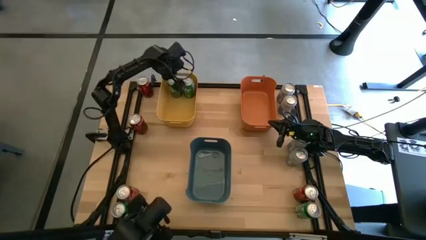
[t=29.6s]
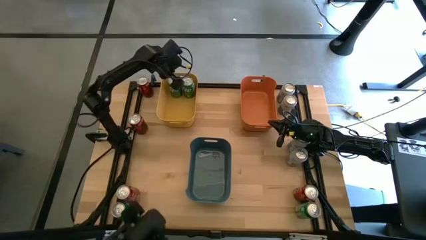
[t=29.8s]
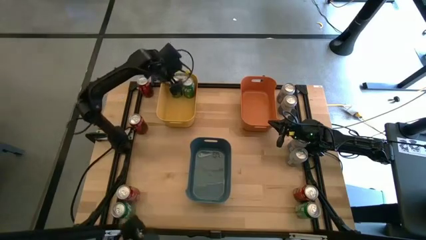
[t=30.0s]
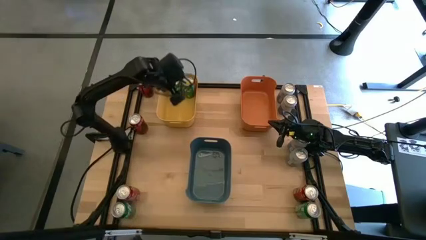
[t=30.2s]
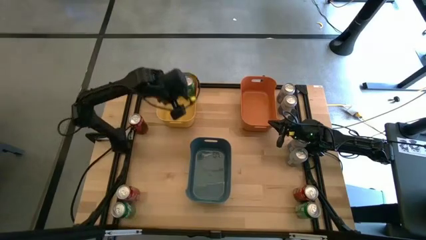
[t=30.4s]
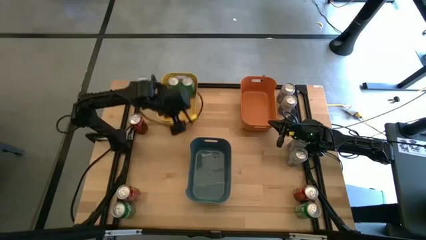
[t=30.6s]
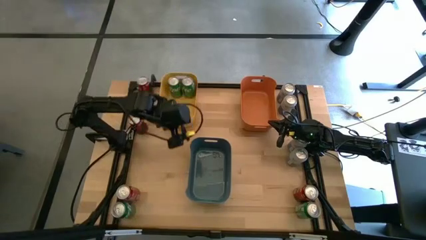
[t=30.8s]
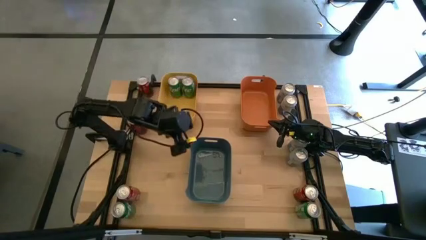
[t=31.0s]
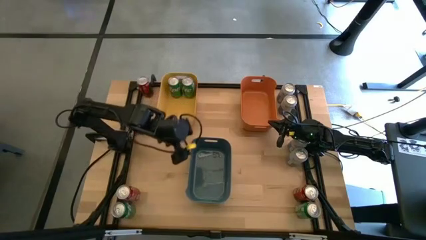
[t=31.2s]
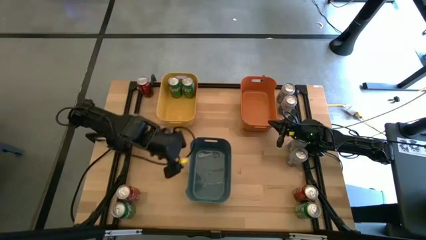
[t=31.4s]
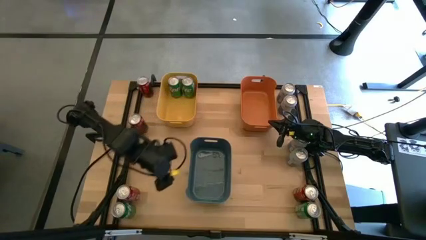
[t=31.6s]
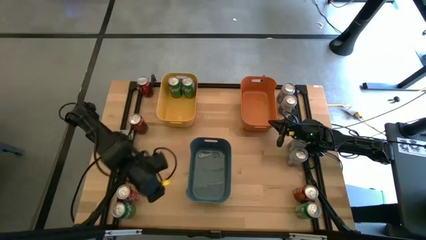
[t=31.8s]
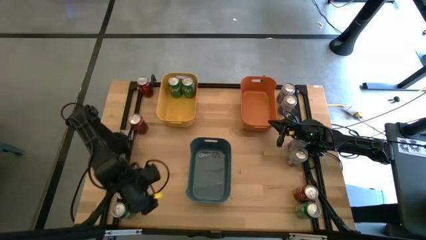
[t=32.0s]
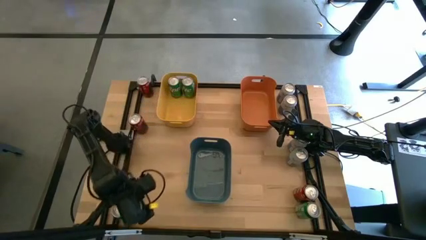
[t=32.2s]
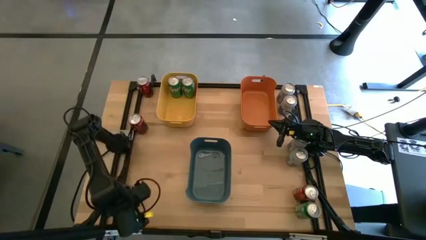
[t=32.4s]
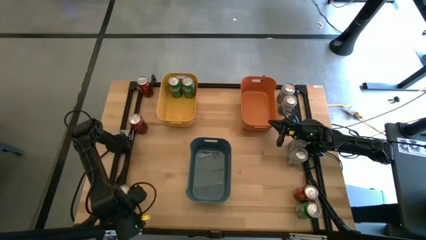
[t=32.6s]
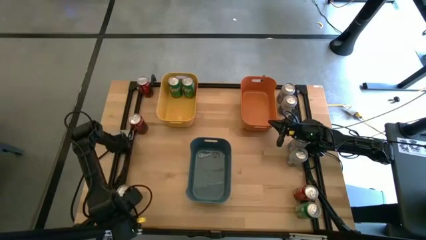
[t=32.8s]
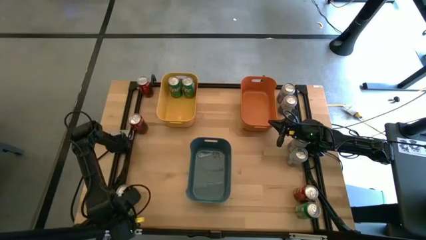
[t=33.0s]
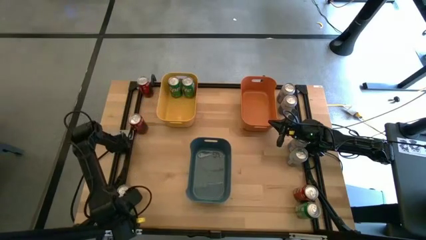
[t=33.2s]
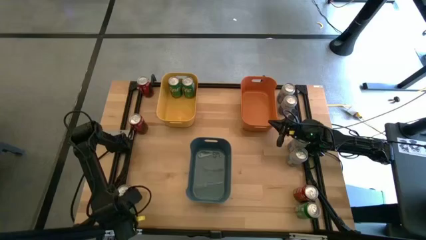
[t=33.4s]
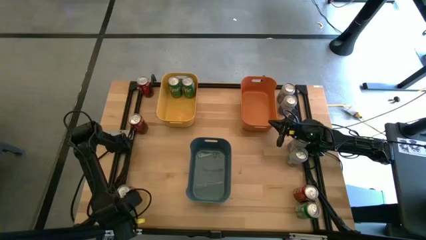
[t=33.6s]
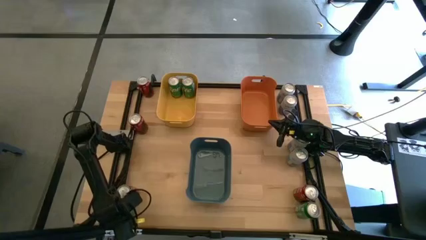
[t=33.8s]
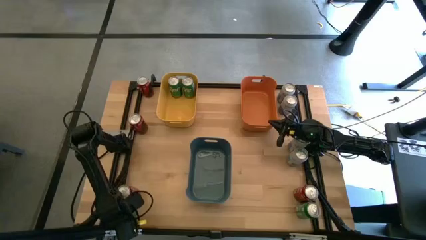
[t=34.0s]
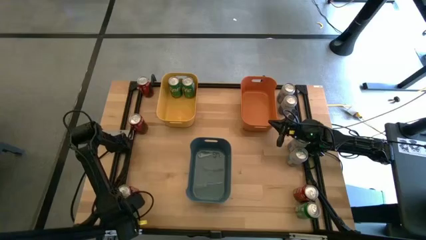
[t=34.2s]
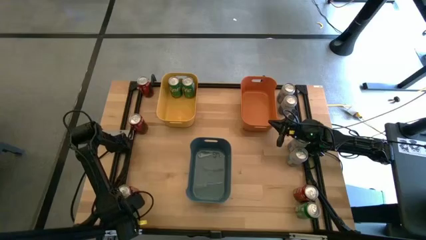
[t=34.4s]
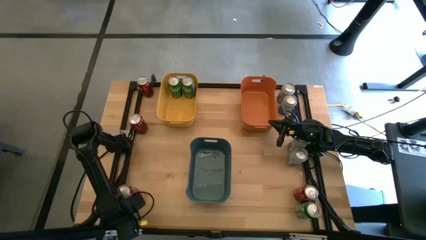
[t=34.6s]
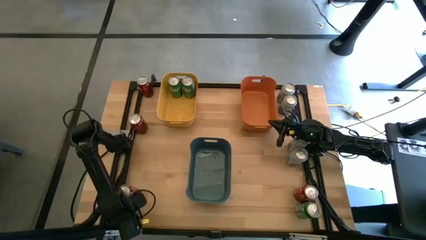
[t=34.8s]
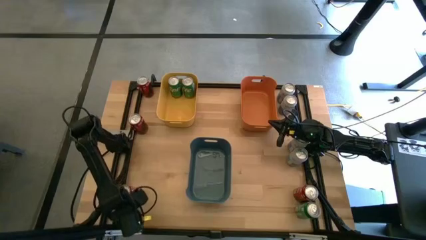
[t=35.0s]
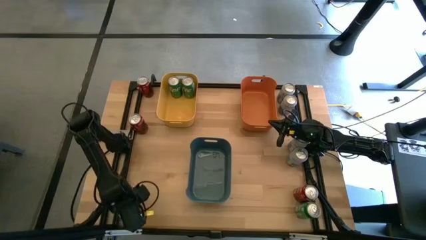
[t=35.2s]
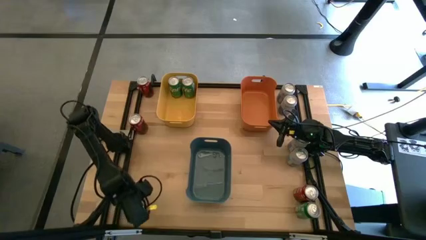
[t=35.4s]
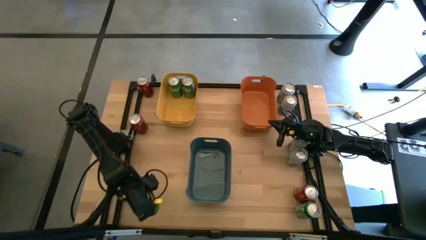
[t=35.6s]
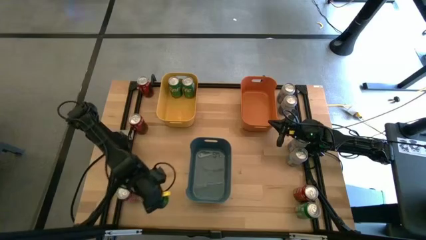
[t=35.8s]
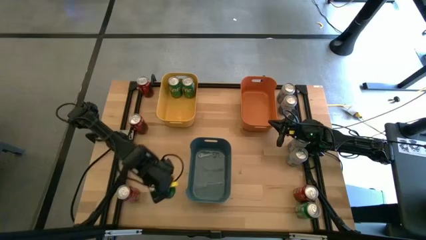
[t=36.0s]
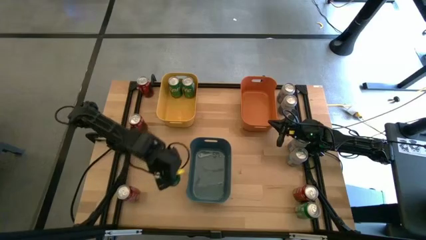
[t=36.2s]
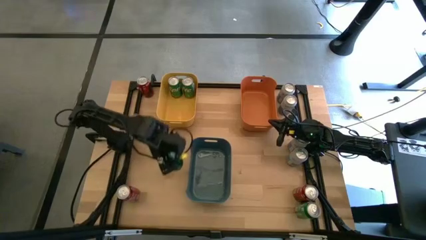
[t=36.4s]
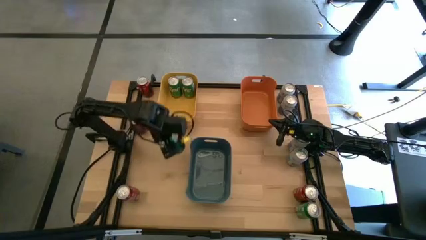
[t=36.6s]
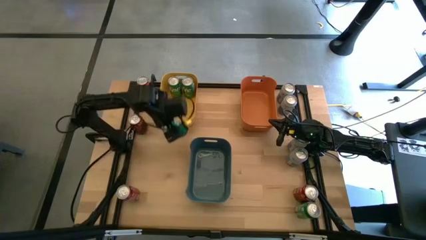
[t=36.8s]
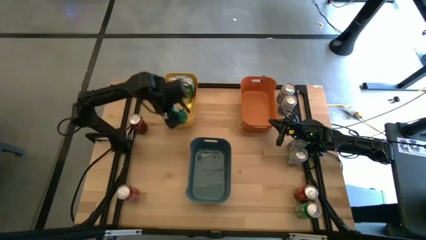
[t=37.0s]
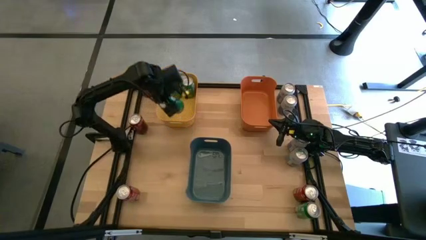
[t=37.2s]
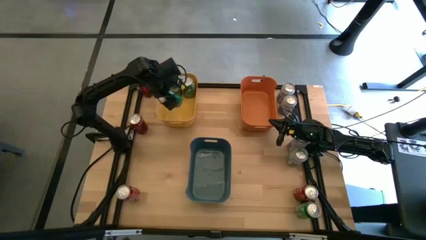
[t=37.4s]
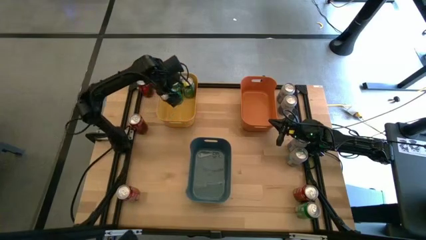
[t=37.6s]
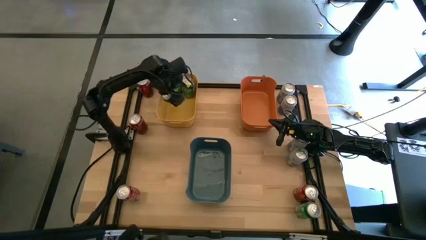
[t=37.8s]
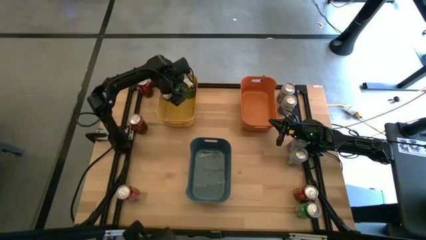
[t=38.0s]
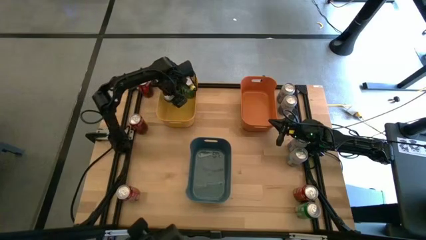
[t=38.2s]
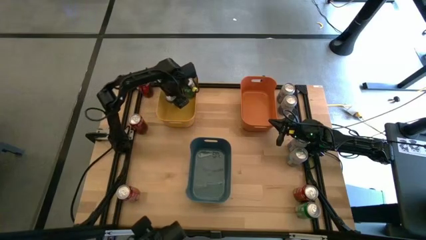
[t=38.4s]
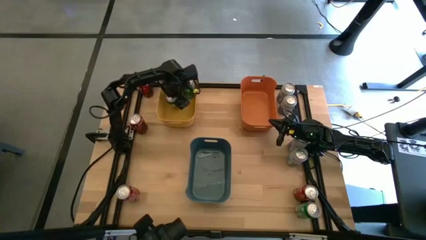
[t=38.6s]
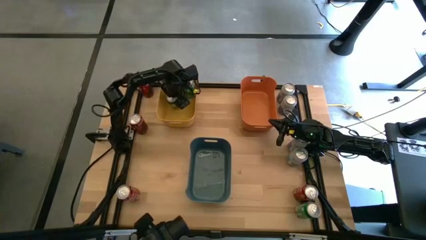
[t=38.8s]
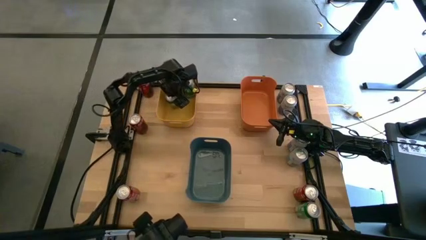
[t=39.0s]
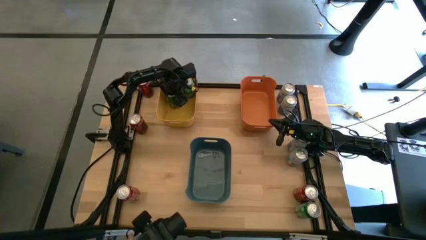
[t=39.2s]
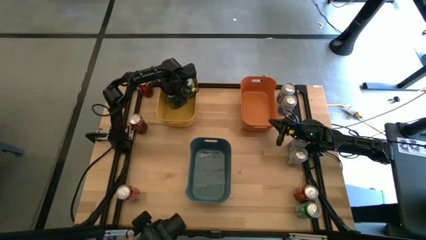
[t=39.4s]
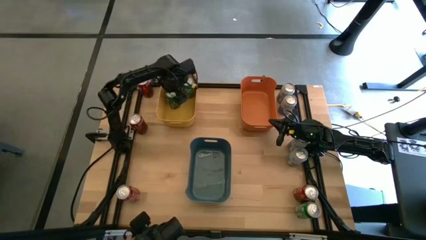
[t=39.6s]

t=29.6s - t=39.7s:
Task: Sort soda cans
Put the green soda can into the yellow bin

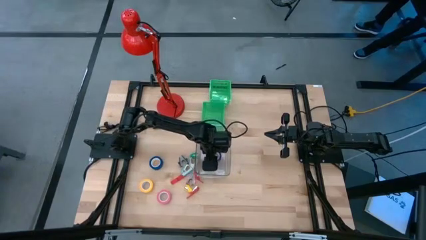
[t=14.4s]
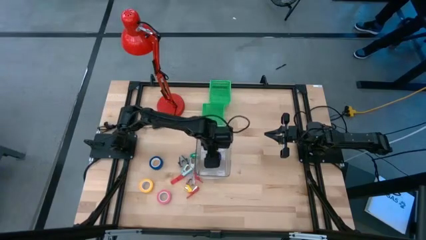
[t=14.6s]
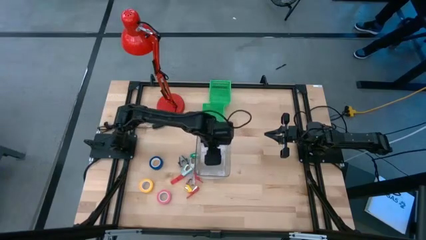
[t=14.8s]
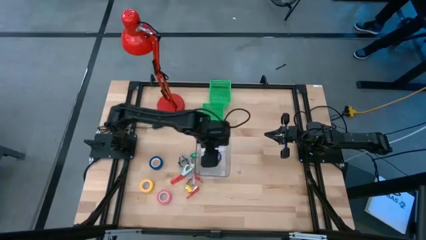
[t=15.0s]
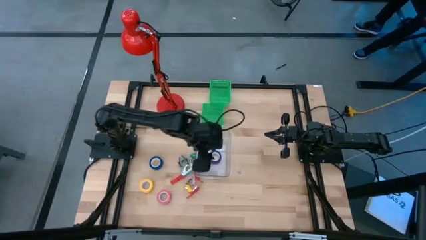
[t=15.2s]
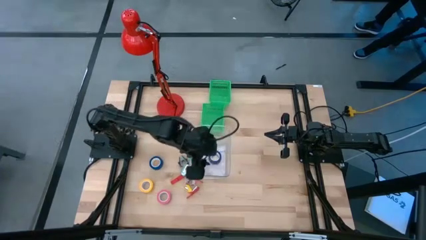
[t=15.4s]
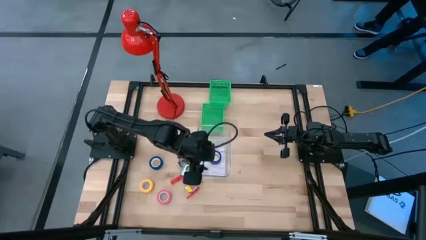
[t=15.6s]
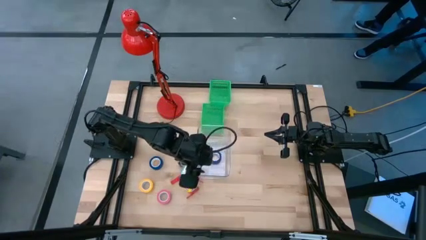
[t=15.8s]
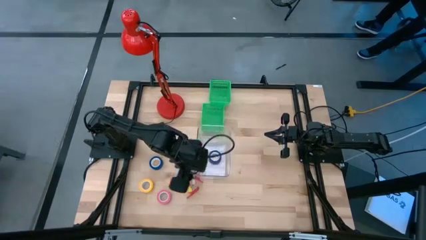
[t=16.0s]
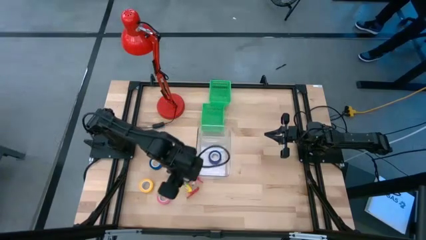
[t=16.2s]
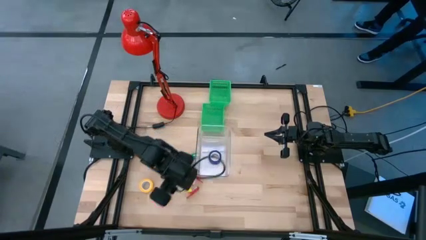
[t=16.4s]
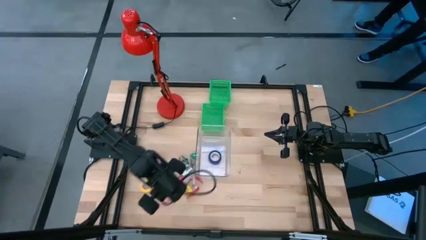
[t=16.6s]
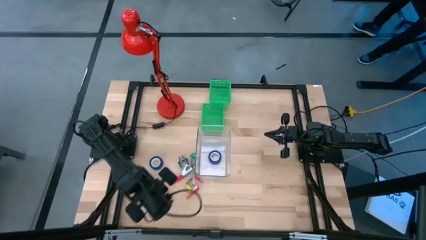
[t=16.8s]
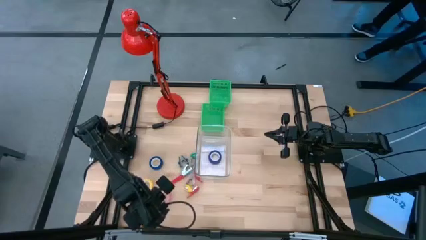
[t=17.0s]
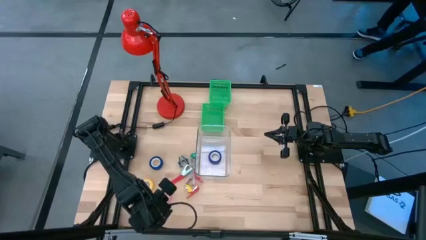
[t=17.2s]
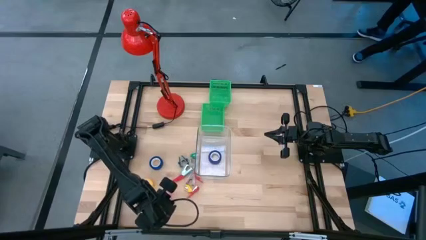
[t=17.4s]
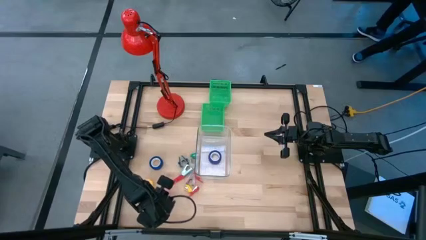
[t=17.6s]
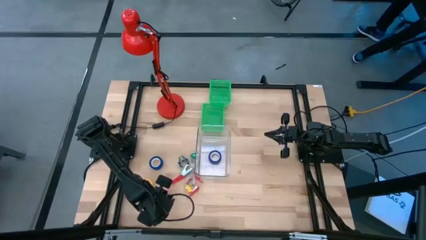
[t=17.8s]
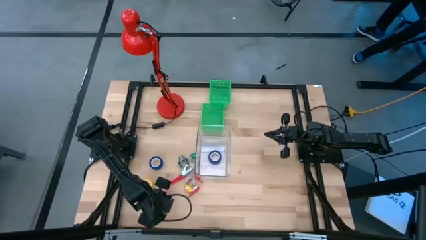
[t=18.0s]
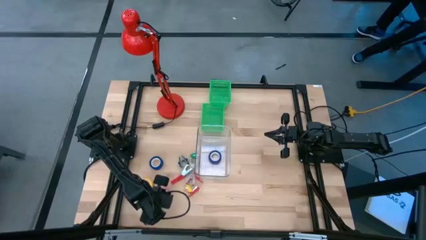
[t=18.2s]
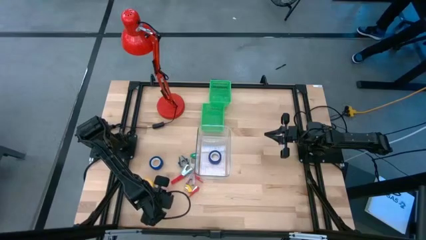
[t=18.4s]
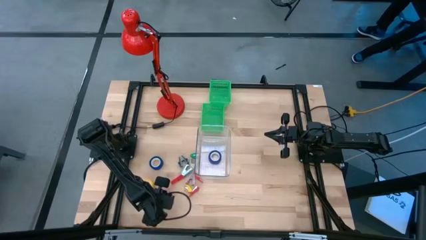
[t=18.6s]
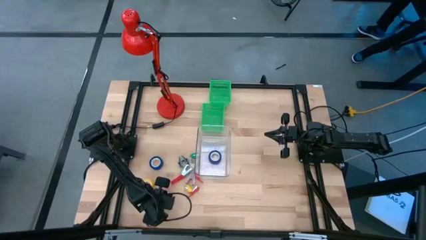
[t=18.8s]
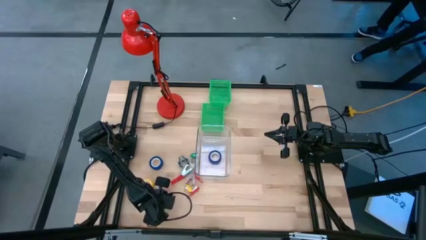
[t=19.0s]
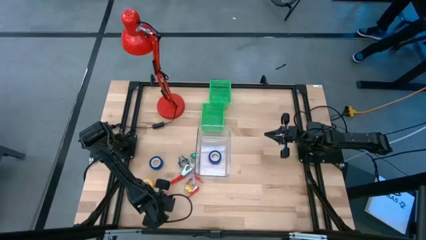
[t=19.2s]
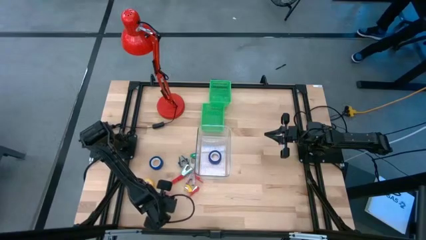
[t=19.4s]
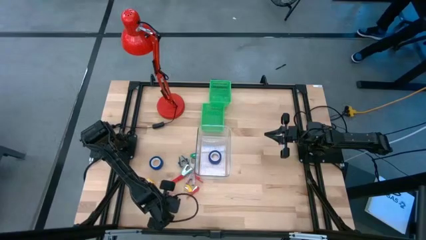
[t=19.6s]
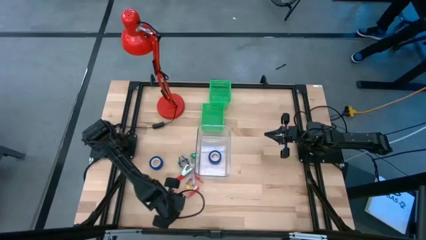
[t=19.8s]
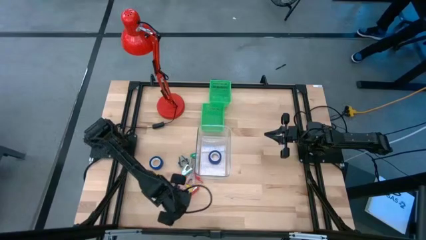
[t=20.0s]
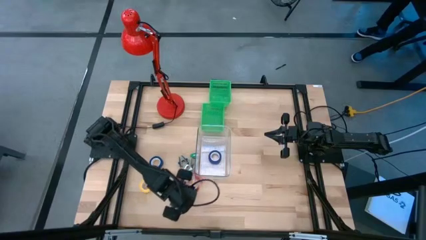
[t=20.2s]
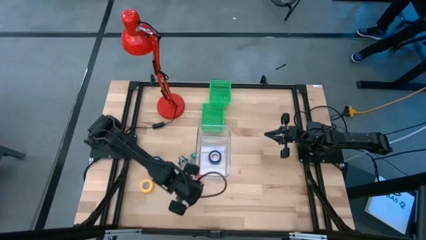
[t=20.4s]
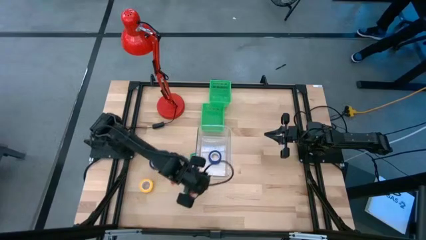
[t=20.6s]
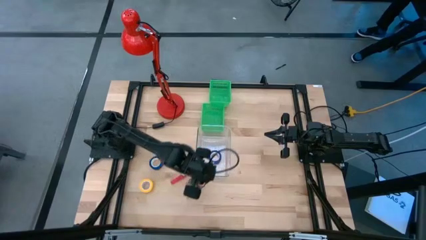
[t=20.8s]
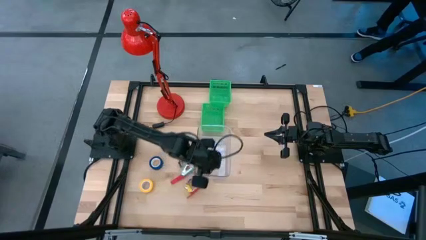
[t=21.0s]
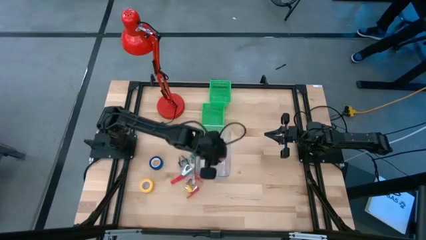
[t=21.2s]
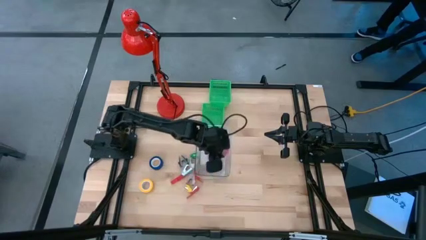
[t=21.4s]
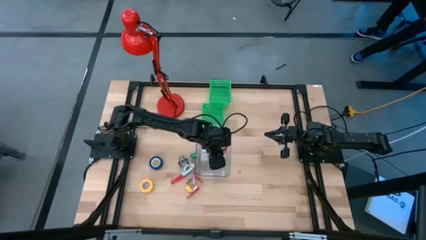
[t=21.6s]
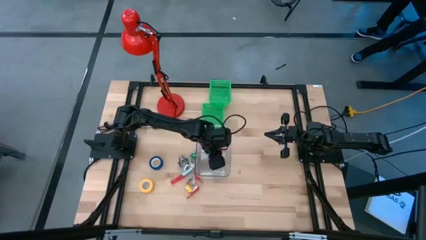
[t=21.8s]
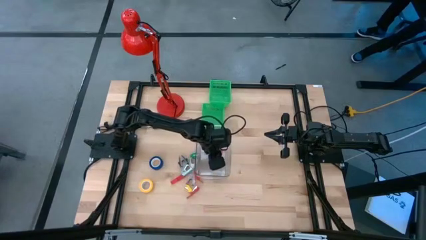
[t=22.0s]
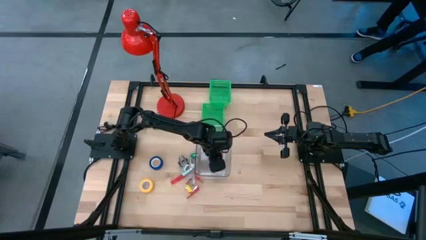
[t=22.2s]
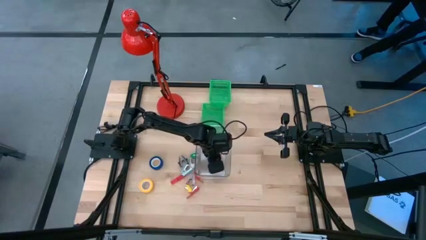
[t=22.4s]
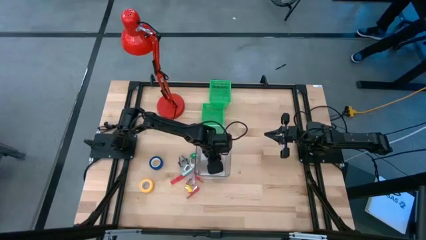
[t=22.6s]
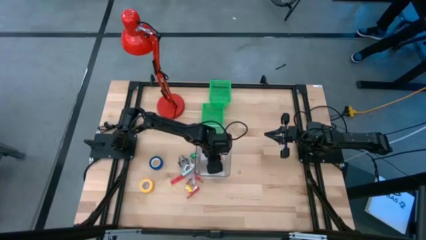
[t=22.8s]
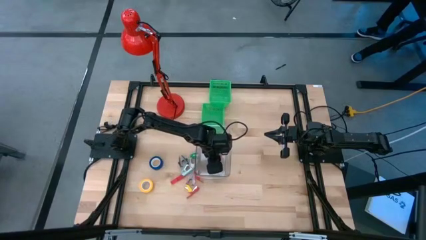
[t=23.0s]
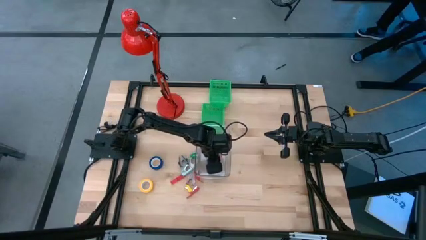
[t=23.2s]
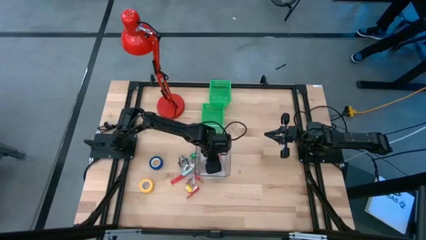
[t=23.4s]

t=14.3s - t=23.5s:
Task: Pick and place Stapler, Stapler remover, tape
Put the pink tape into the transparent bin
